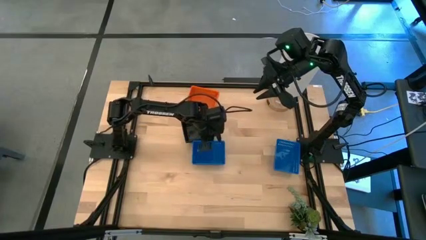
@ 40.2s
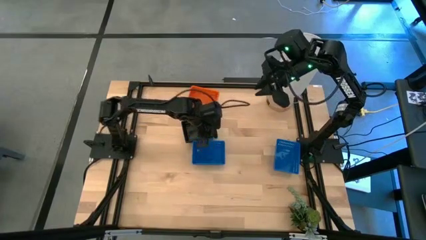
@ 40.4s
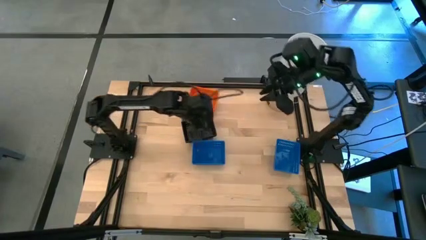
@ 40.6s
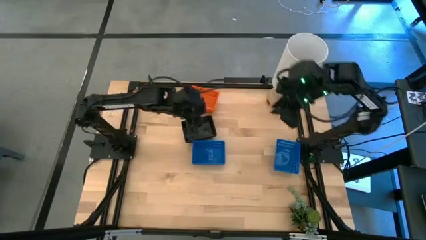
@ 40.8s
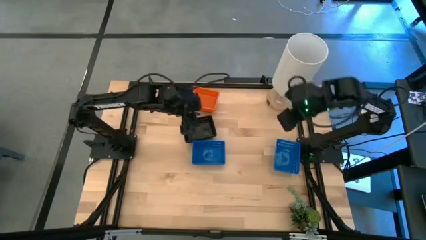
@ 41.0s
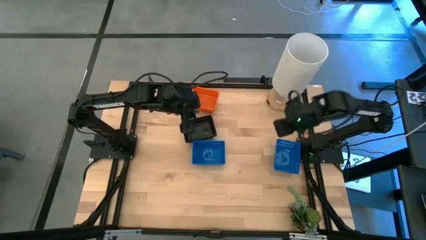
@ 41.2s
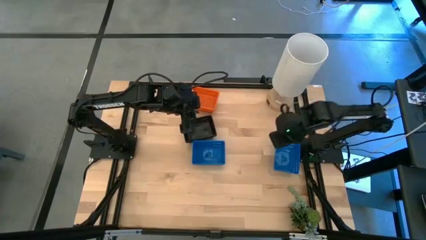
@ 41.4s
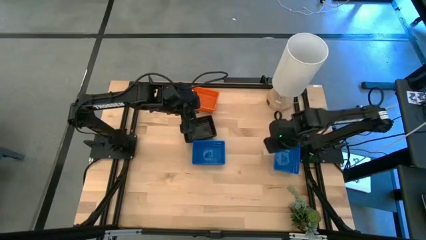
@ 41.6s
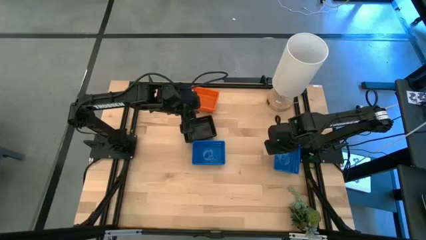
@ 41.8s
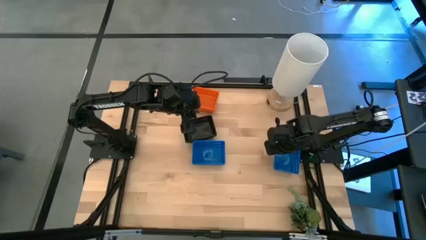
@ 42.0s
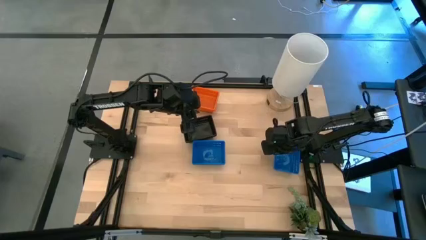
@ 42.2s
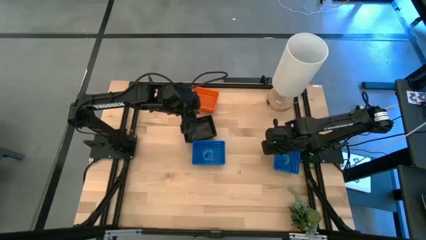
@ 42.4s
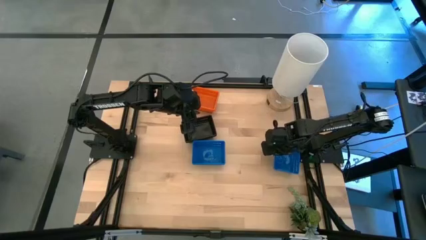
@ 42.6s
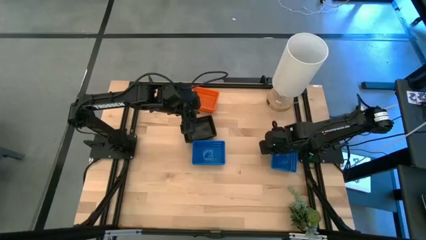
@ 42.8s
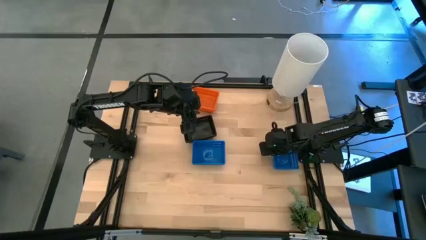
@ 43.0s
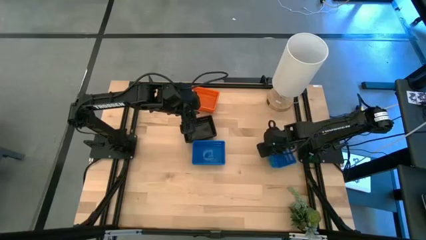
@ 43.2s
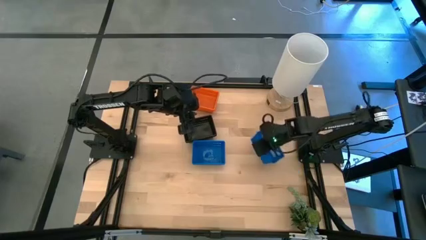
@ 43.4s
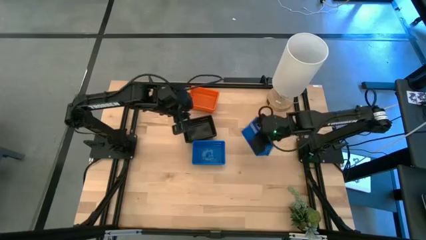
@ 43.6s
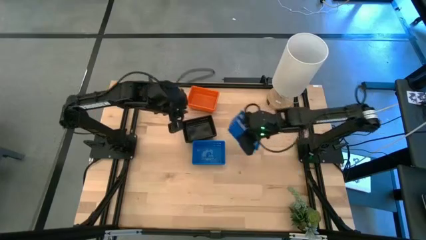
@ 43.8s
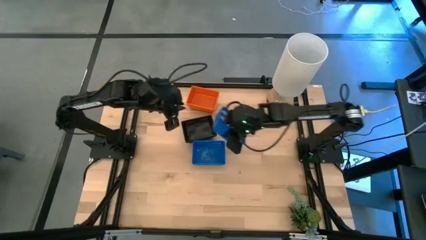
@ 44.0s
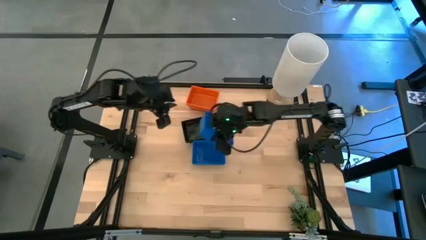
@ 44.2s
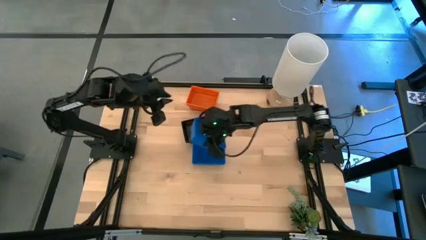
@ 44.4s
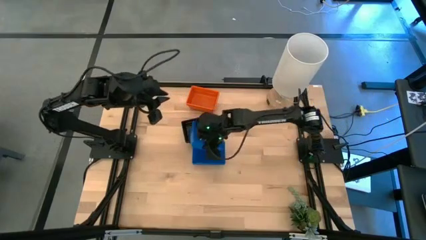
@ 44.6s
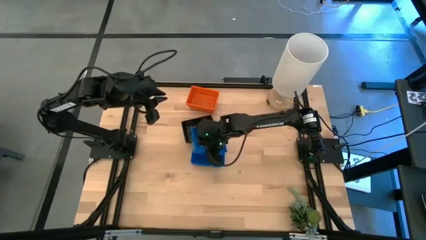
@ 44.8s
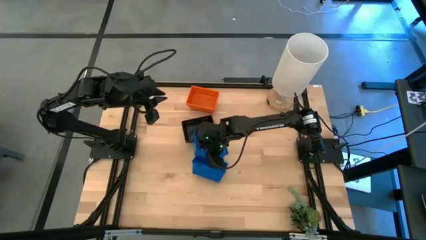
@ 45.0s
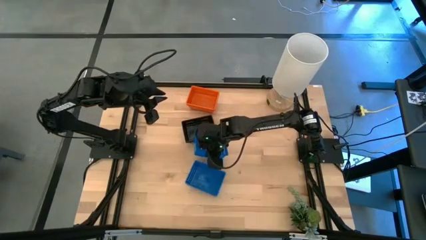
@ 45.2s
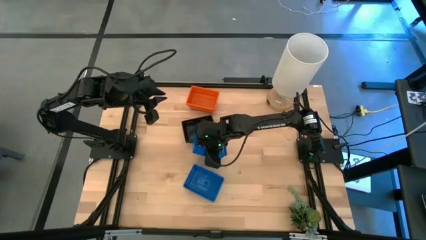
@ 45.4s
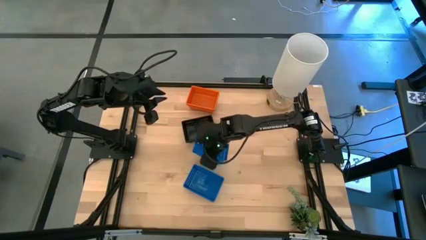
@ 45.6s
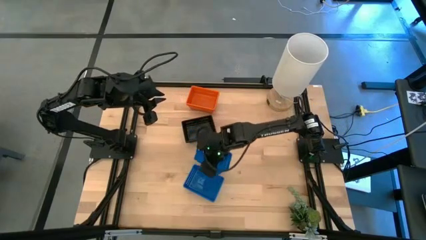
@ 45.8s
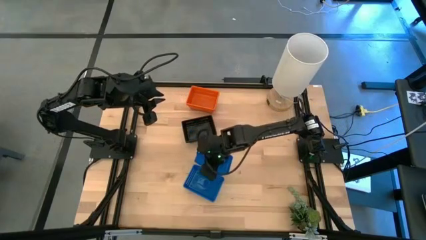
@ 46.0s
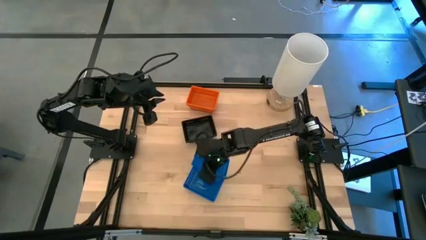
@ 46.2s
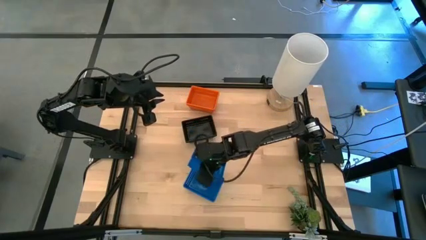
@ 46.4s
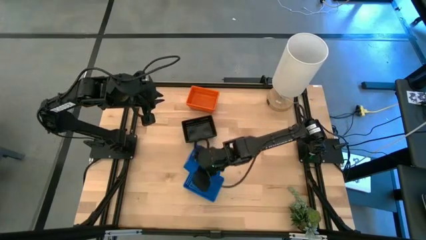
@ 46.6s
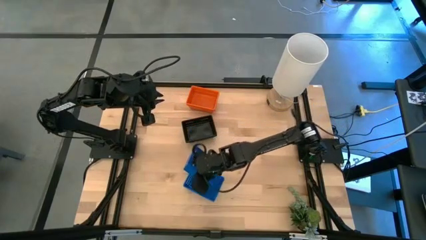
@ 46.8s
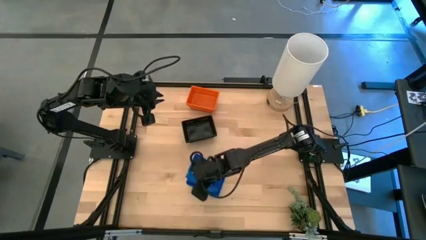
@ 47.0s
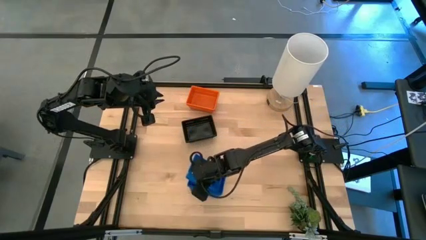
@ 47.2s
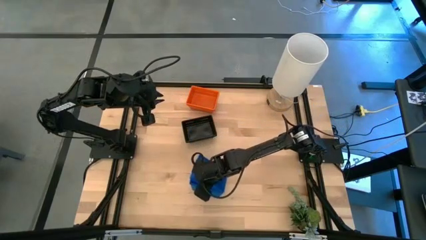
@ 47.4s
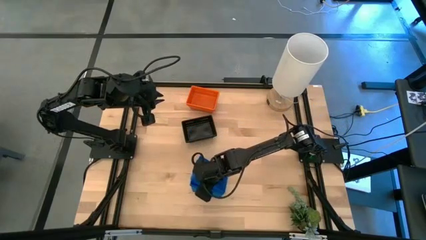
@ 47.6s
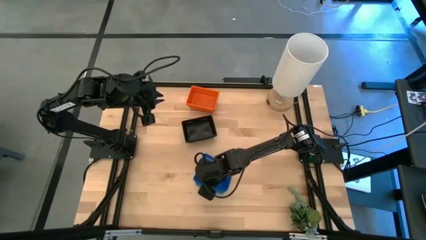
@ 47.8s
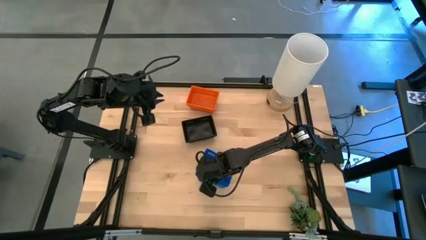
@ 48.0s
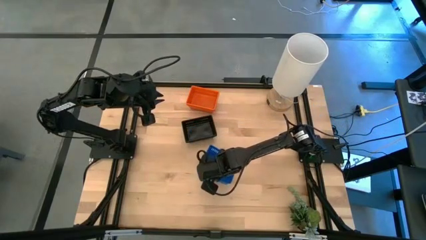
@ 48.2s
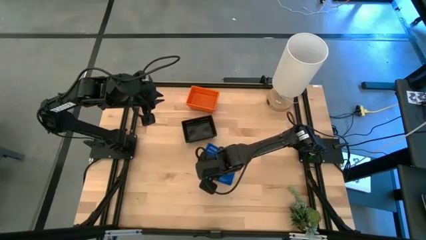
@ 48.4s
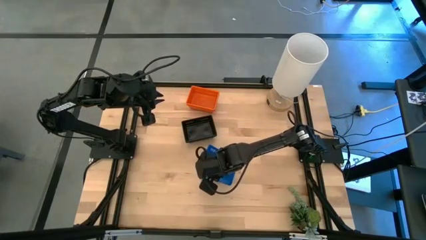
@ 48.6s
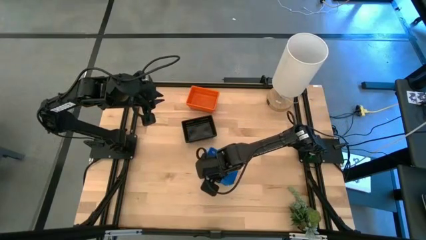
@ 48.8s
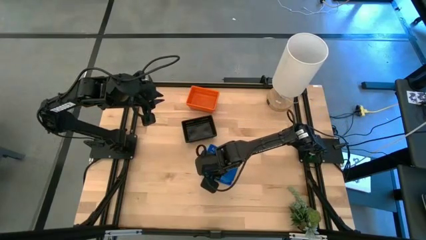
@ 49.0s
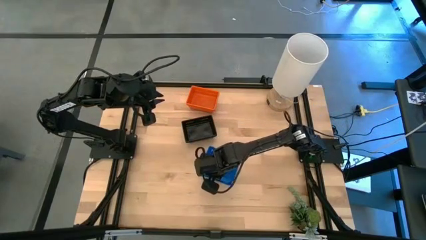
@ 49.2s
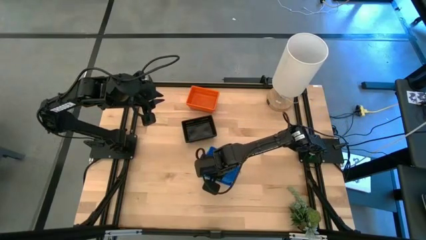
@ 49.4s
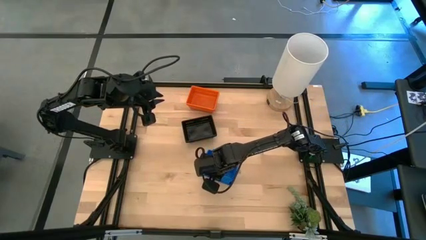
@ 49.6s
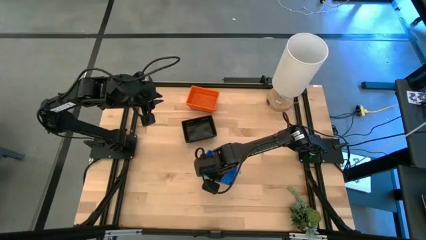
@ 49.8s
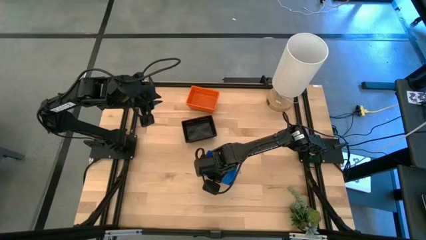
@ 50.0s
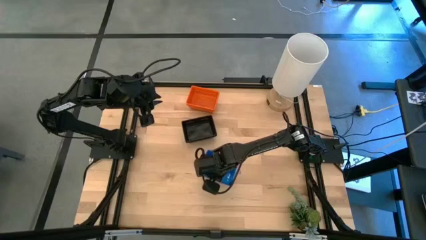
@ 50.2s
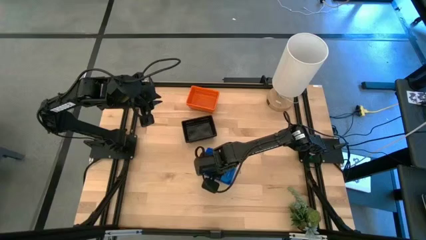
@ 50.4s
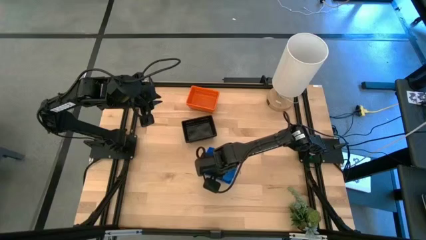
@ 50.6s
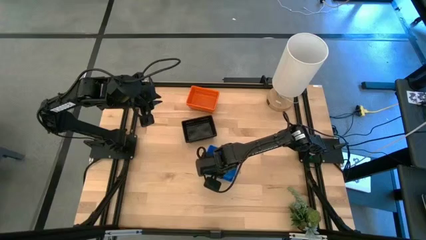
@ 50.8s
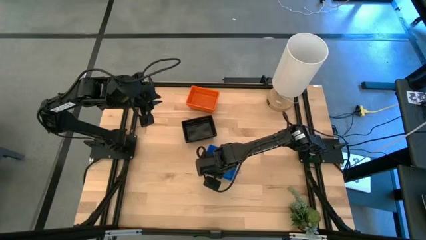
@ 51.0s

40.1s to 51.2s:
Stack the right blue bin on top of the left blue bins

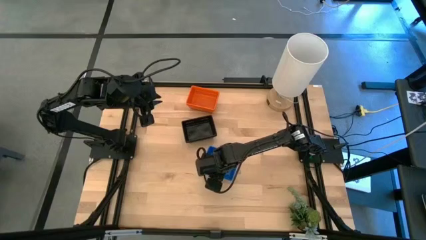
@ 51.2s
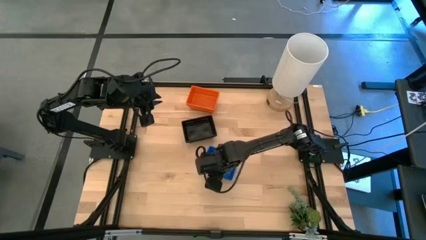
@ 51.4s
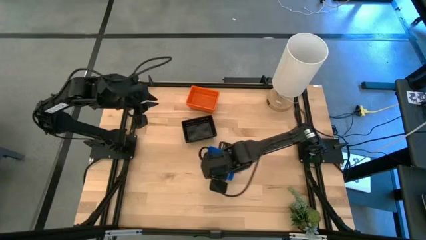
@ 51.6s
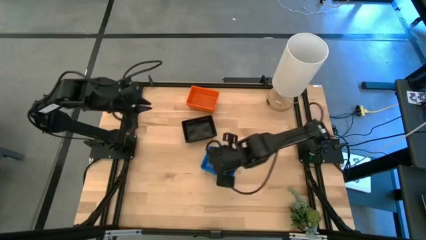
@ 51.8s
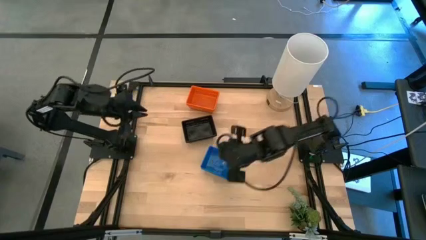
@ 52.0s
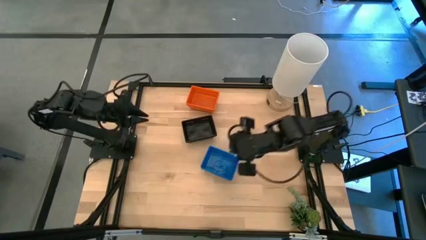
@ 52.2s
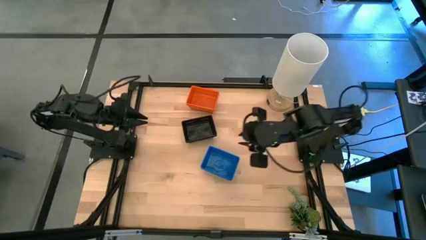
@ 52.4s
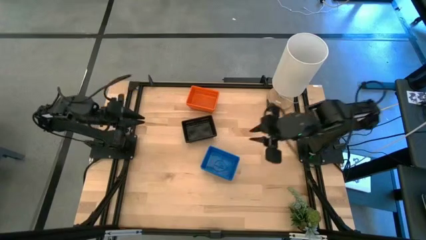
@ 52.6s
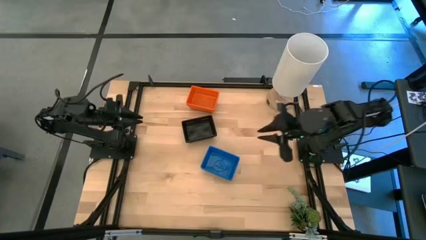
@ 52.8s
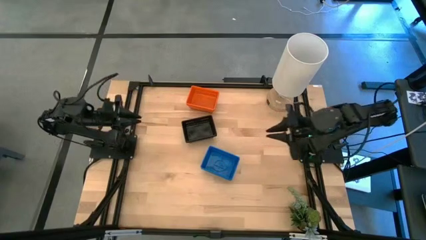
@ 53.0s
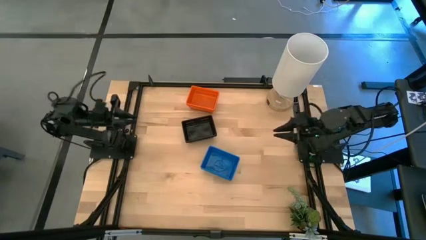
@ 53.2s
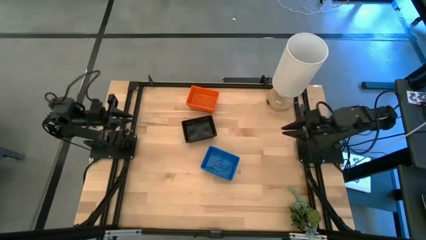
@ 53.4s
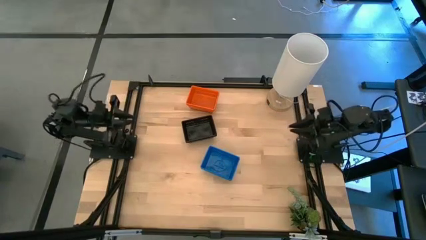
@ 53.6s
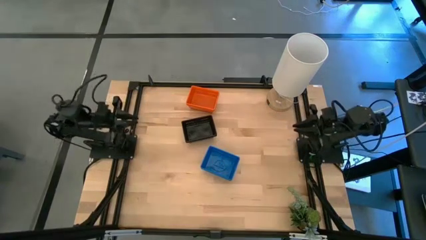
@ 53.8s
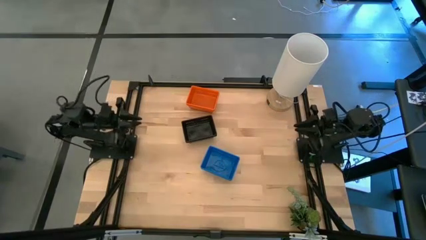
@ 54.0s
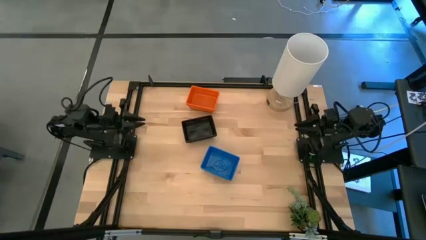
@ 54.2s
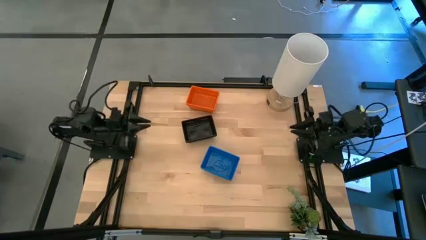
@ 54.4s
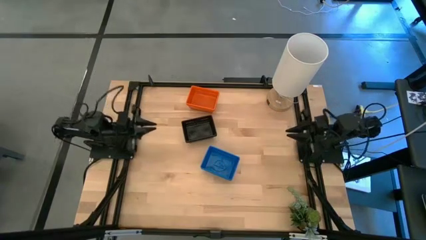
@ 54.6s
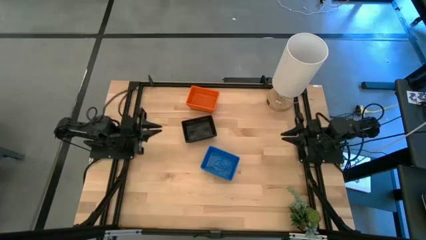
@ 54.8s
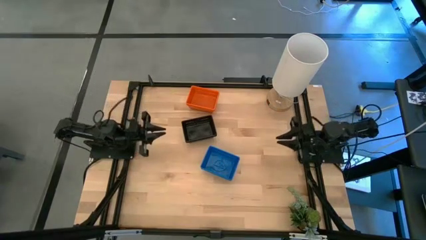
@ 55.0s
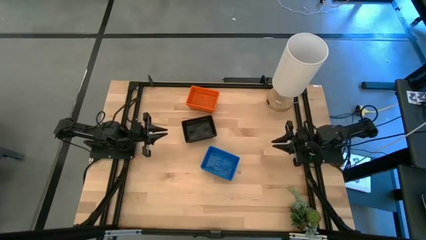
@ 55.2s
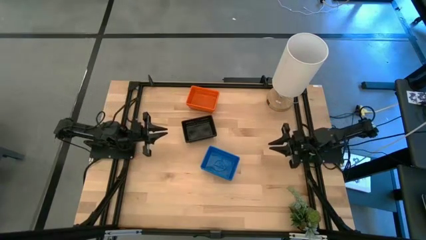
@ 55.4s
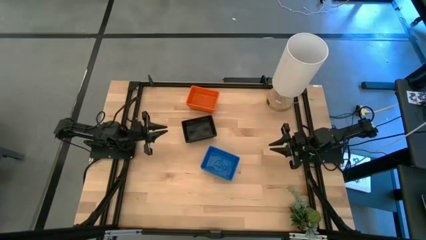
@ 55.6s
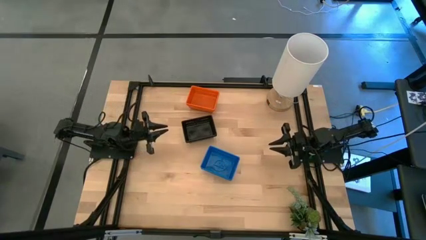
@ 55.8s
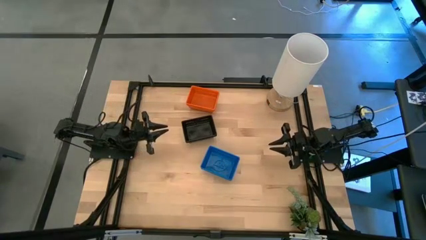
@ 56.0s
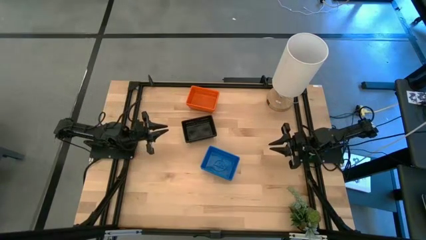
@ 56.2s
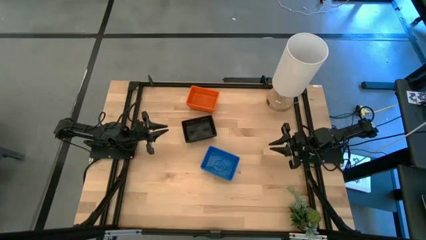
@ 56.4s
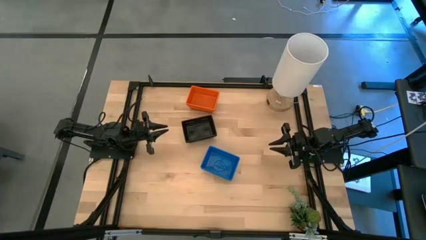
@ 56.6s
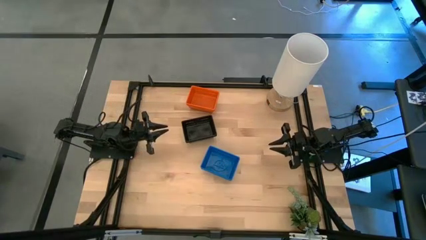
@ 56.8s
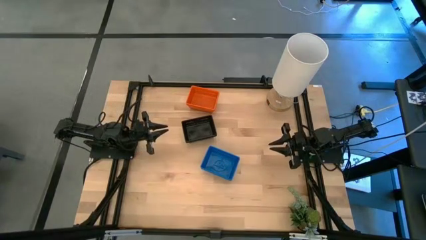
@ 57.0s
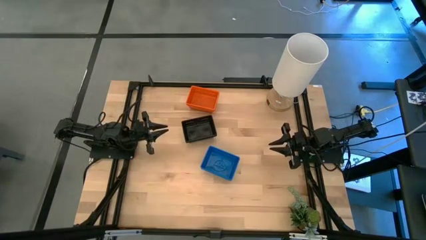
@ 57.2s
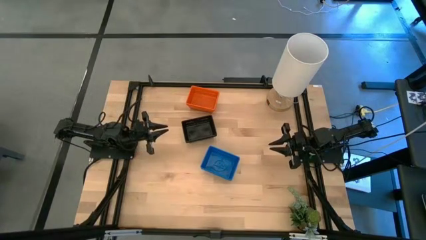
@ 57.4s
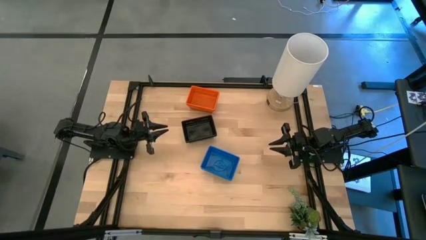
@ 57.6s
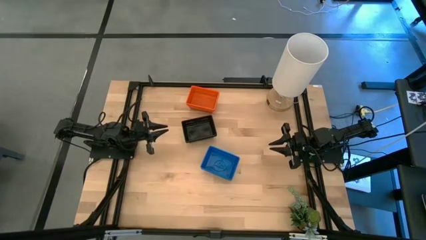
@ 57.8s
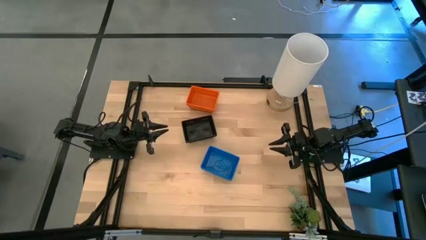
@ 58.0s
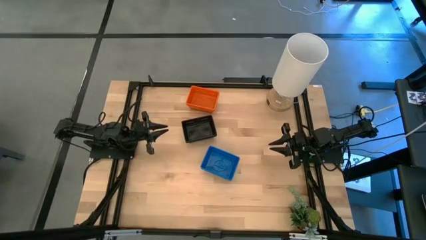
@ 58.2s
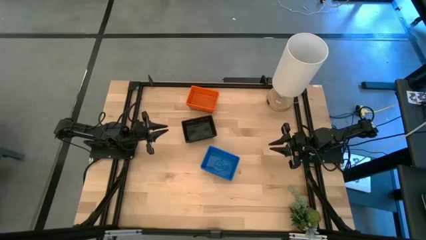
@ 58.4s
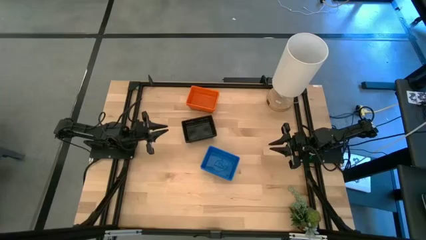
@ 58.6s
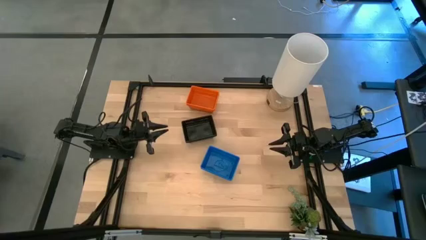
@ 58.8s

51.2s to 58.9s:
Return to Home Position
